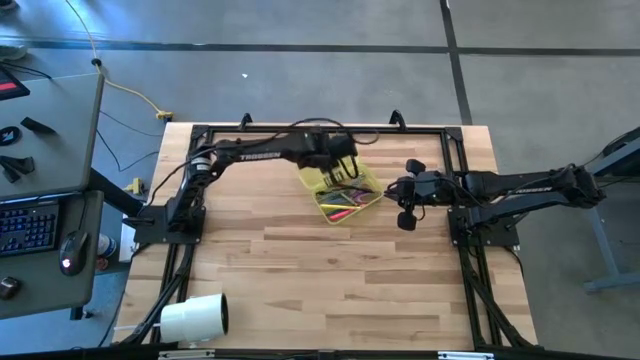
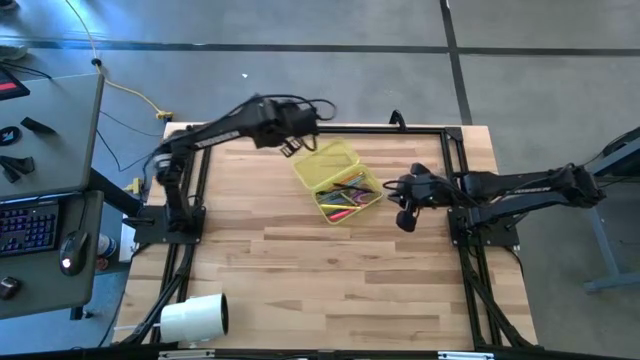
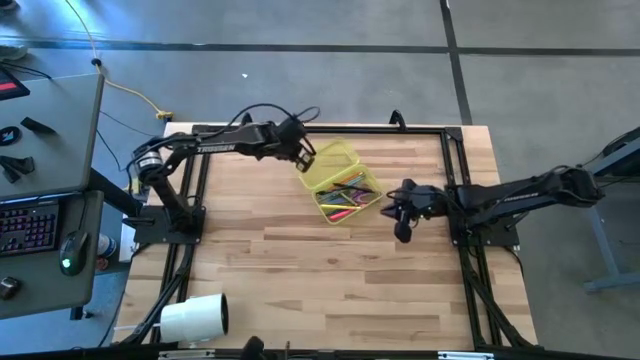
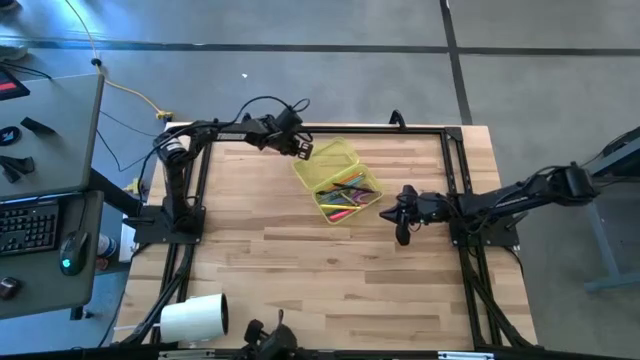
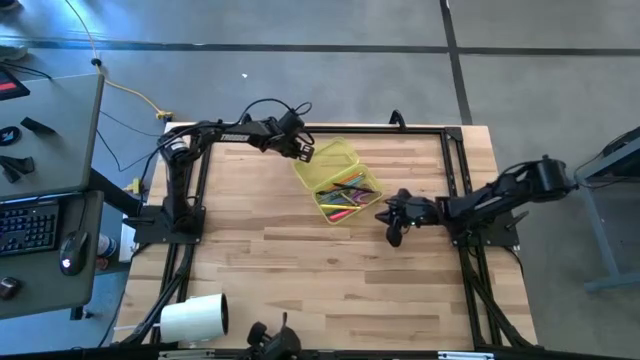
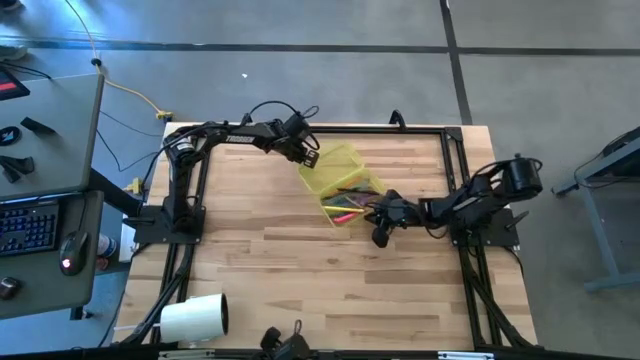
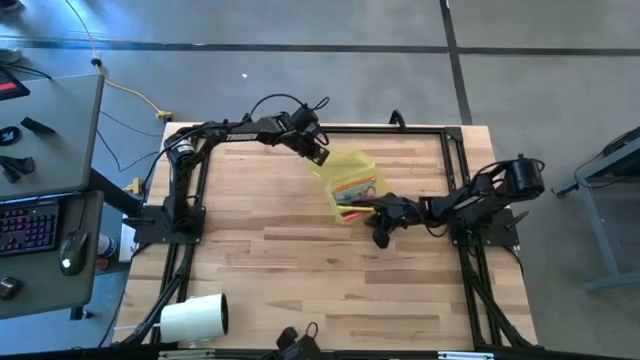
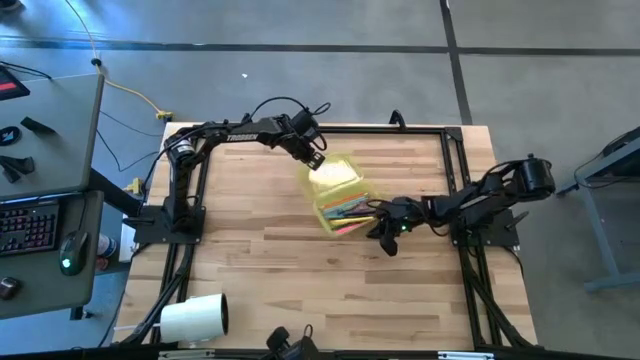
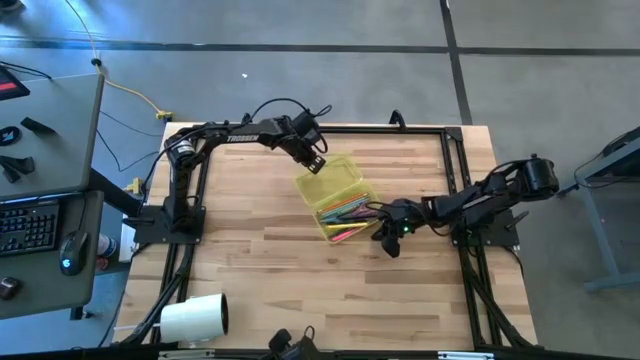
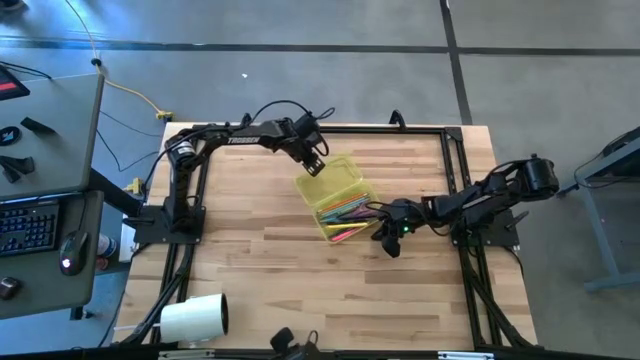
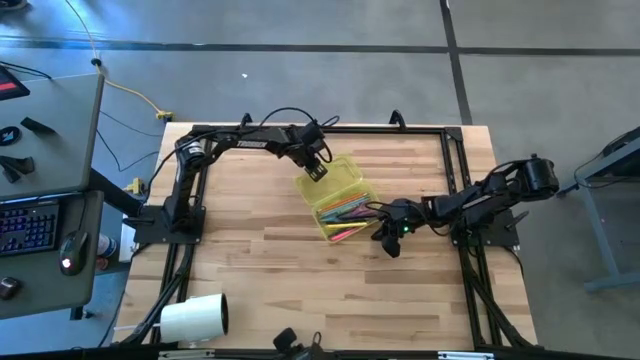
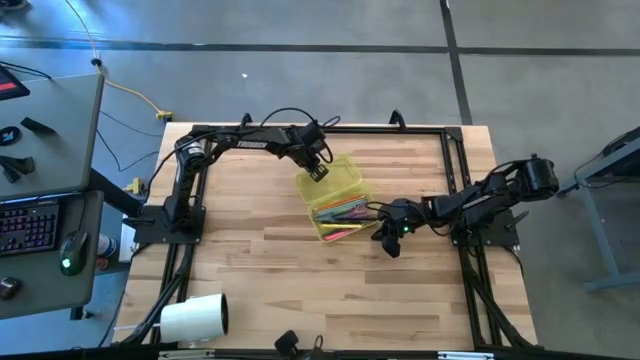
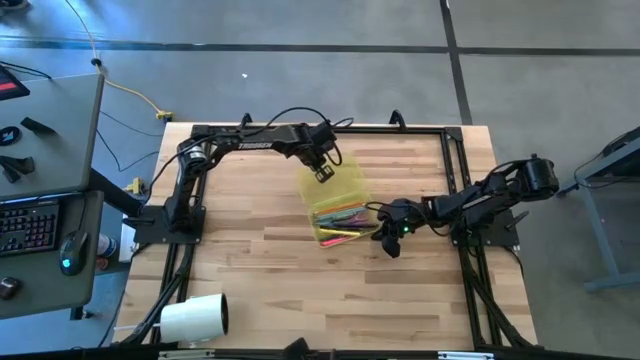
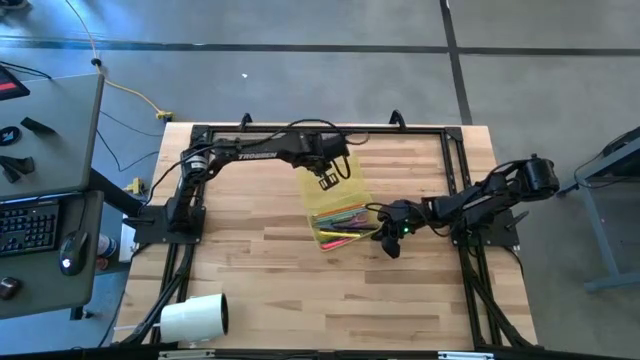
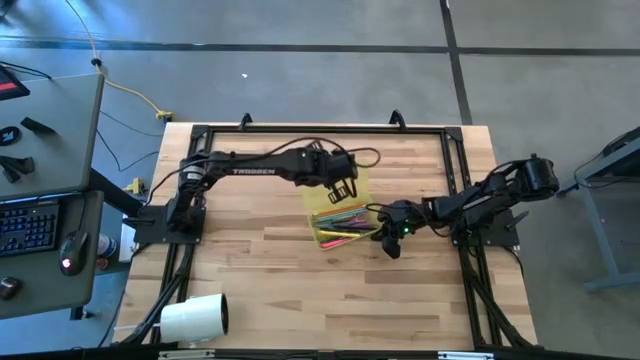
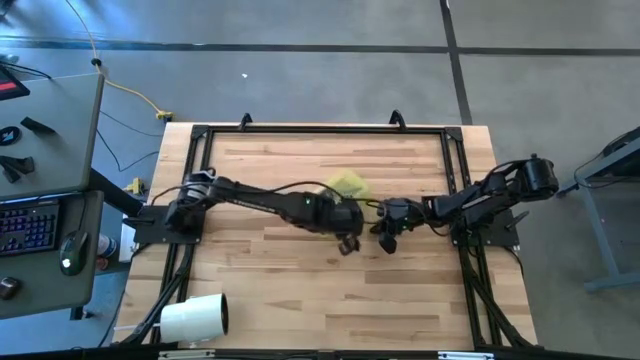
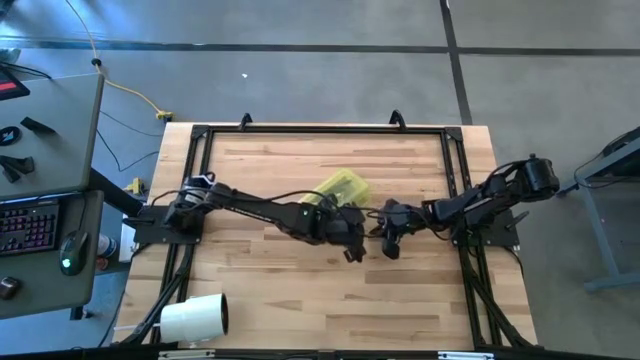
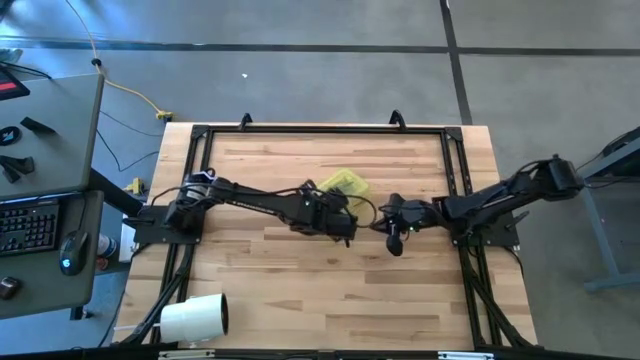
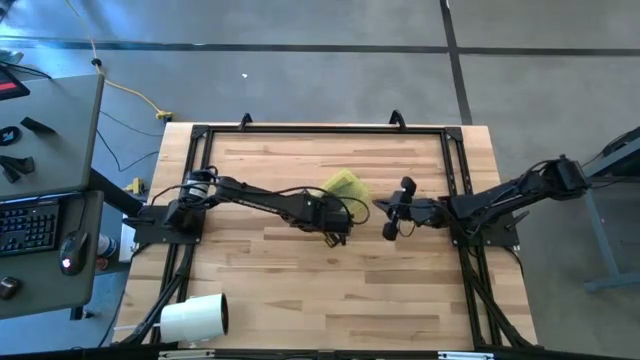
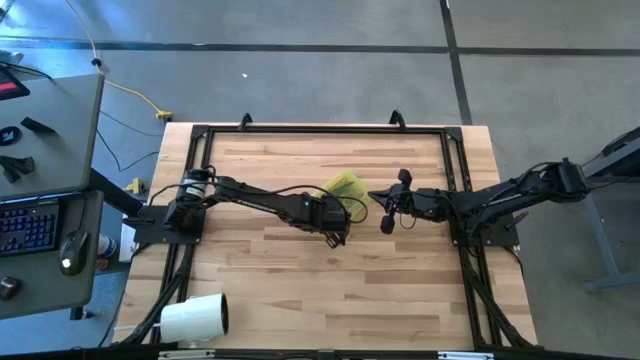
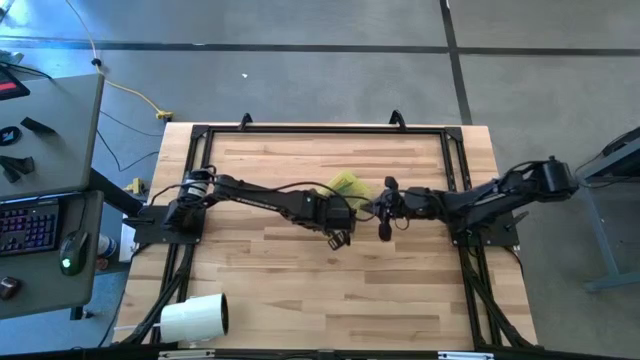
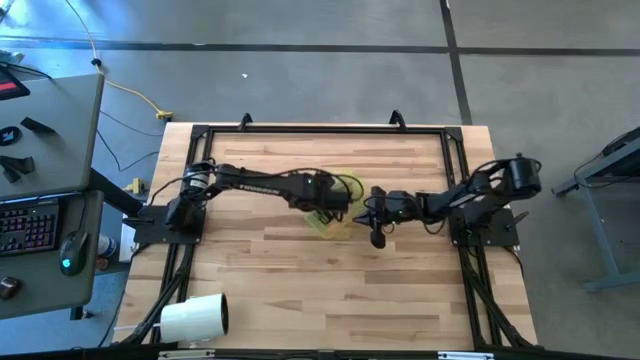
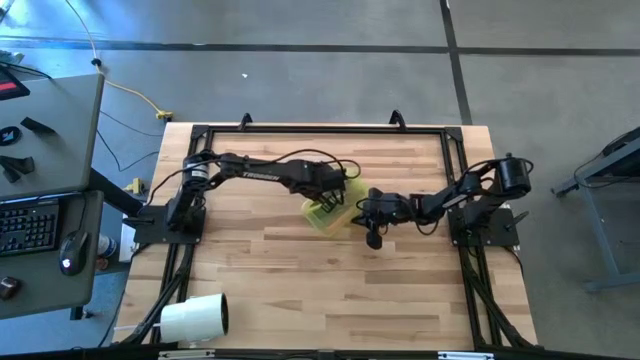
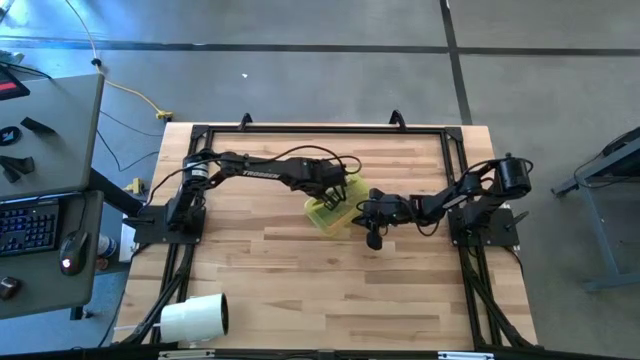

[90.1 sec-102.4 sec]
Task: Pick & place school supplies into a supply box
Close the supply box

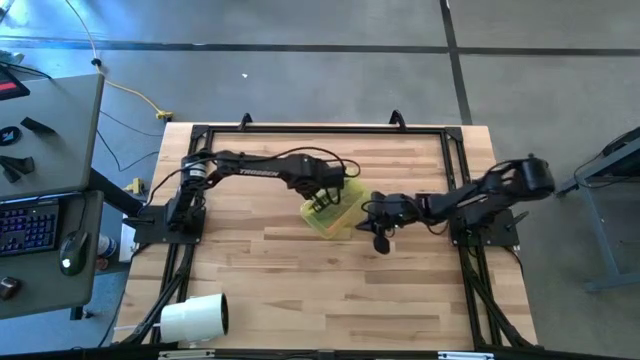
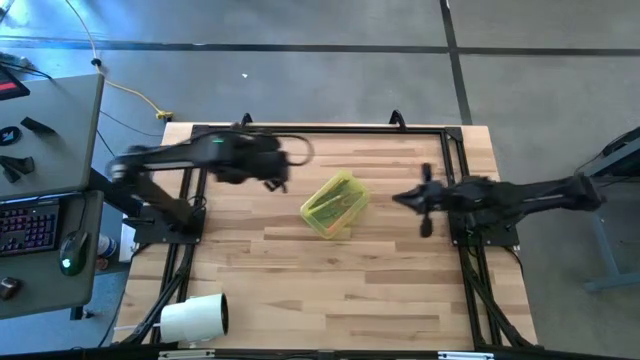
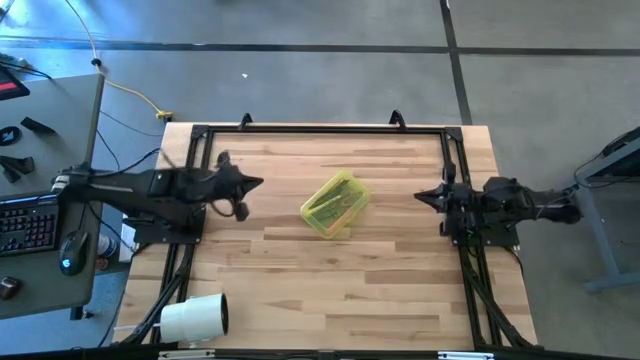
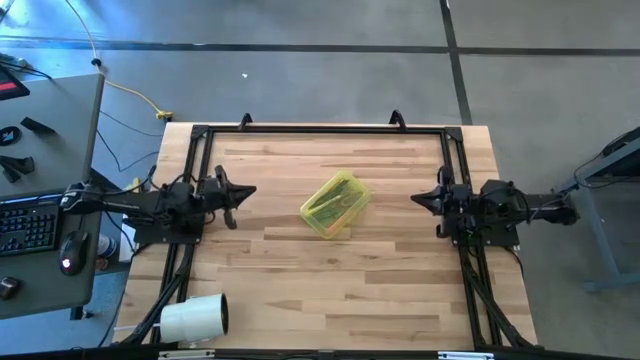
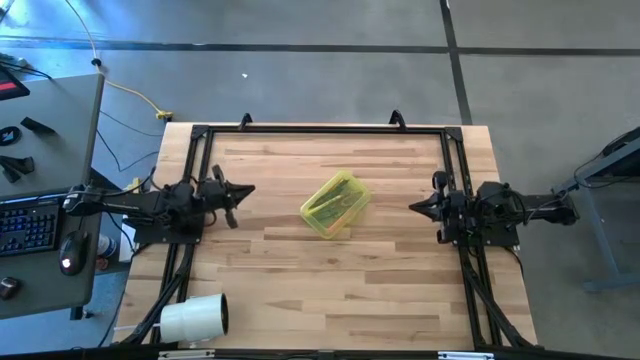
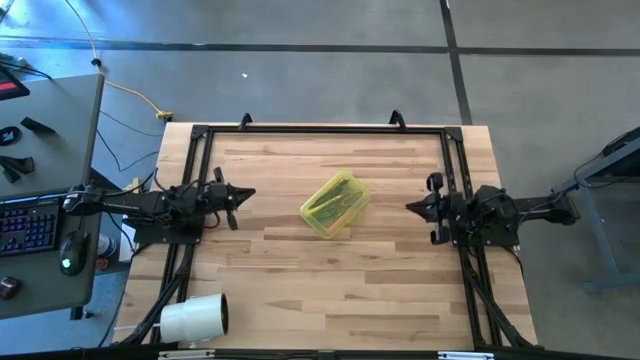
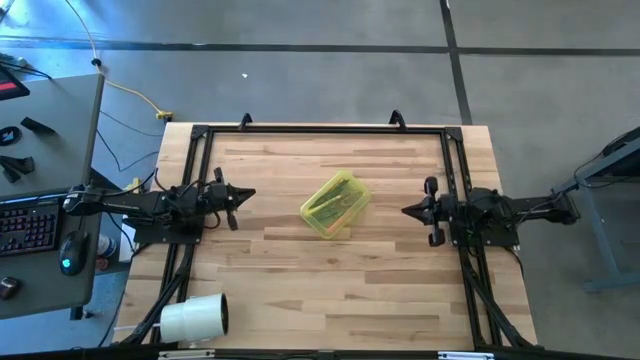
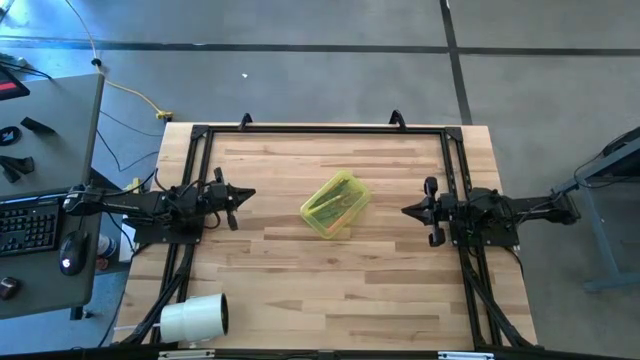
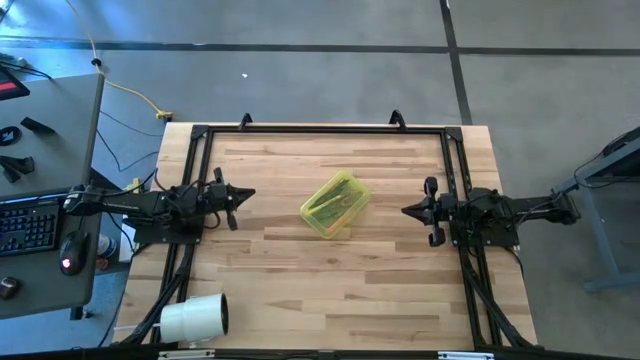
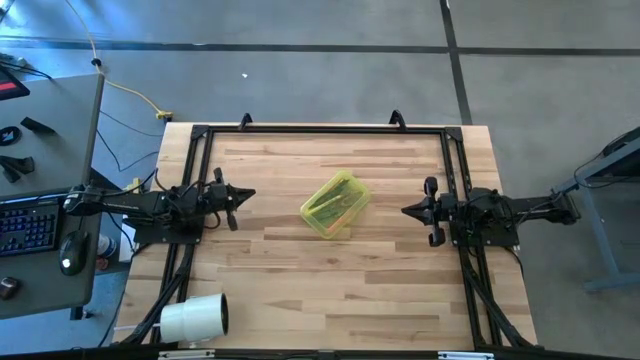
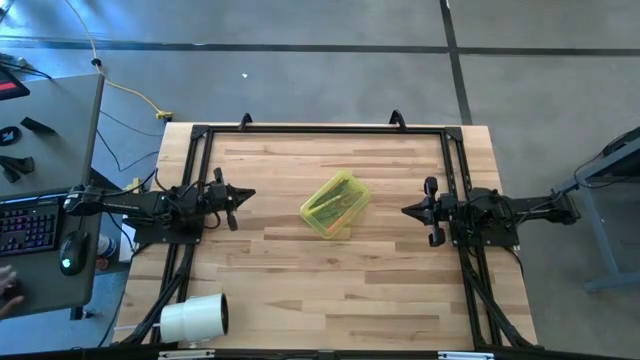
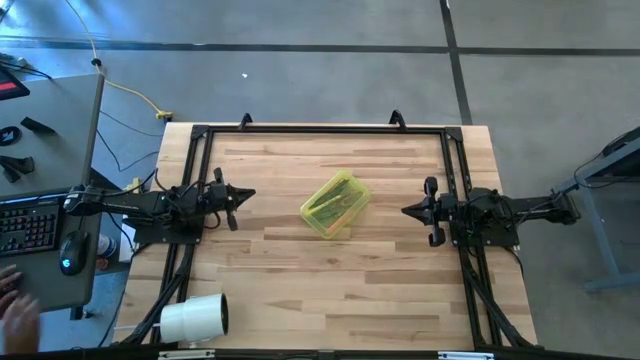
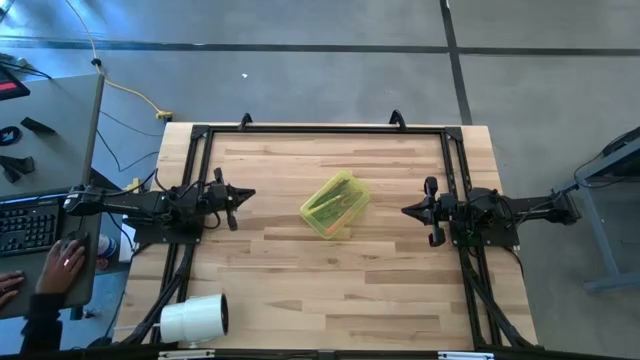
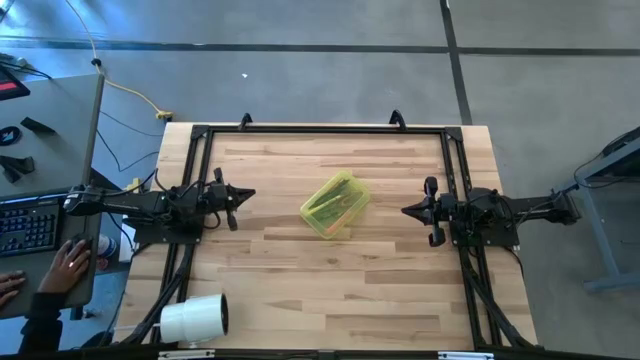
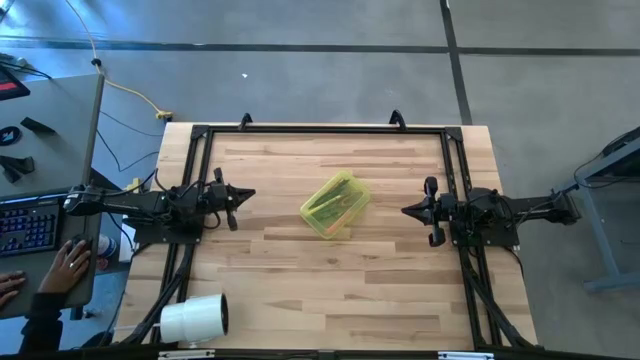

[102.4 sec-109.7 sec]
Return to Home Position

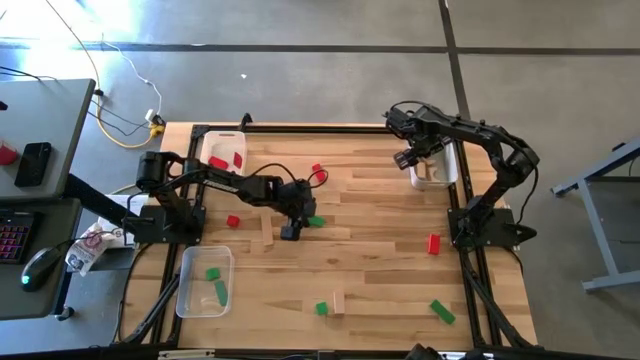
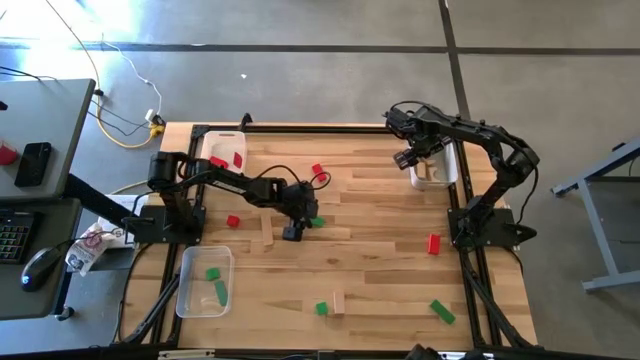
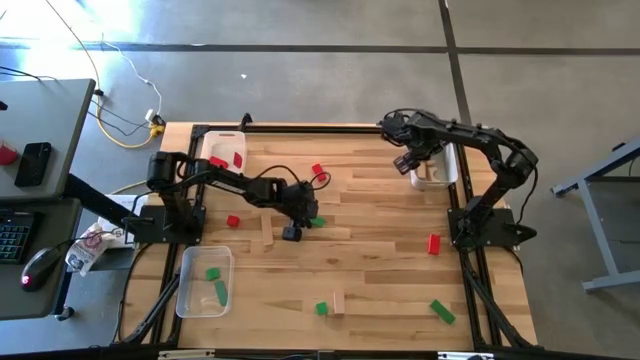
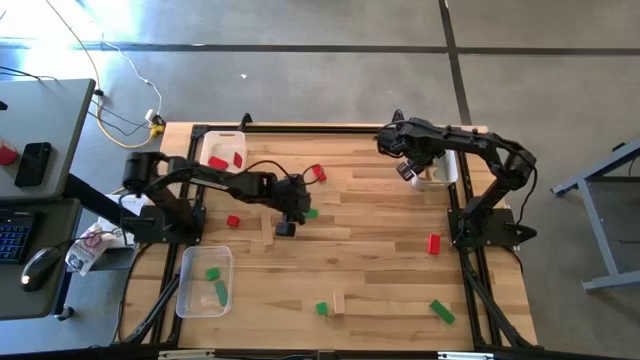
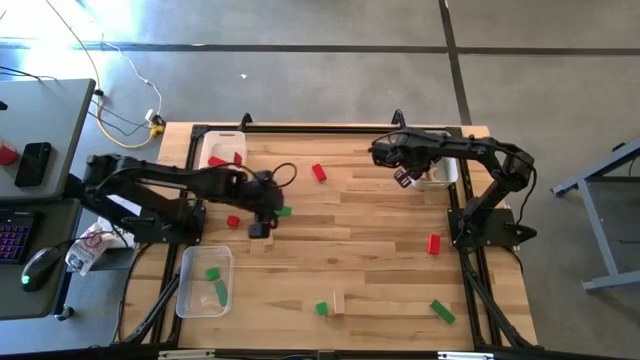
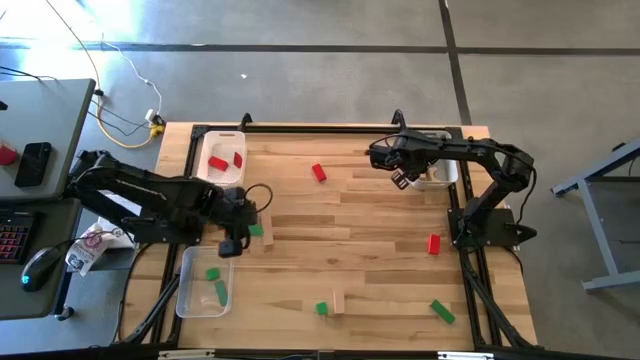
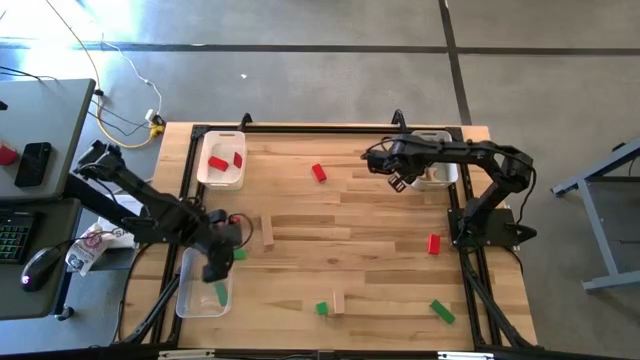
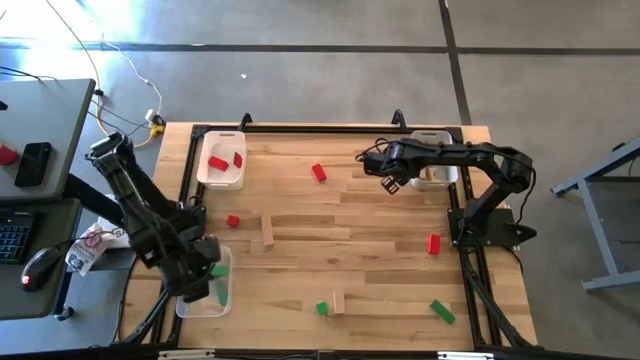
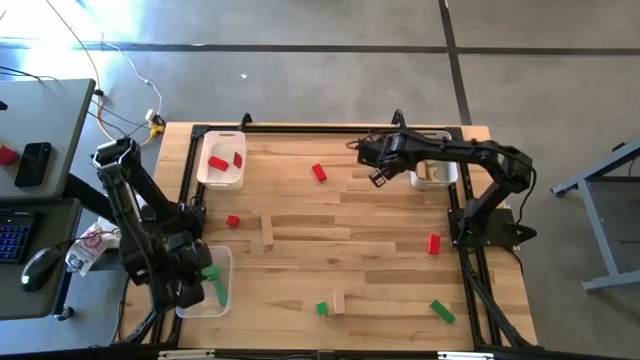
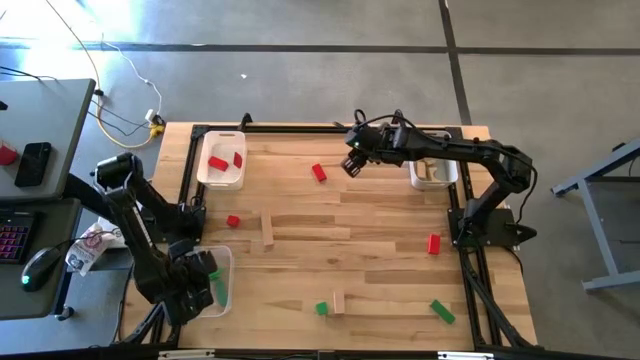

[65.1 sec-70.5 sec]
Task: Sort & place blocks by color
Put the green block into the transparent bin
